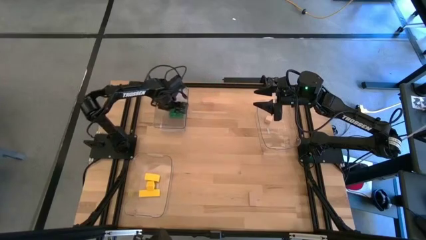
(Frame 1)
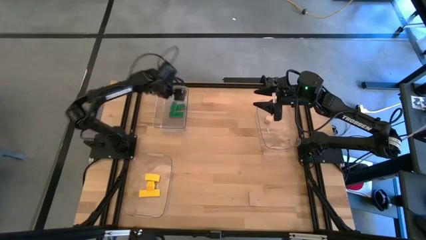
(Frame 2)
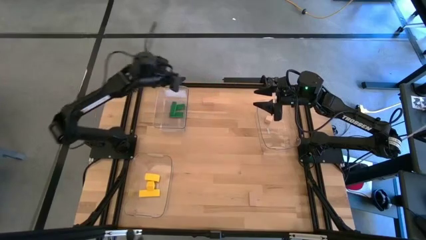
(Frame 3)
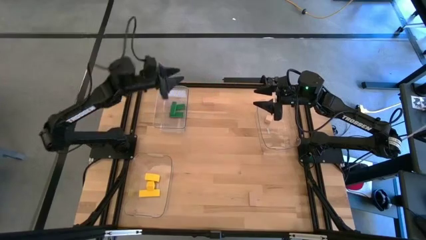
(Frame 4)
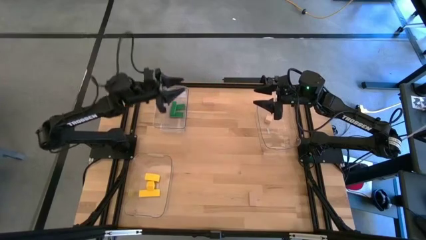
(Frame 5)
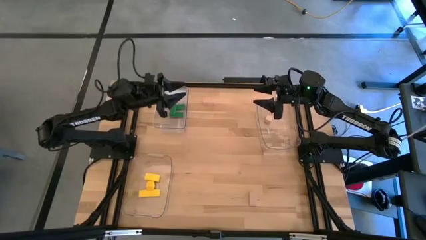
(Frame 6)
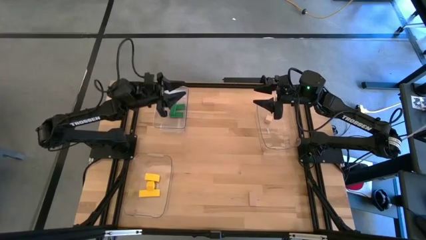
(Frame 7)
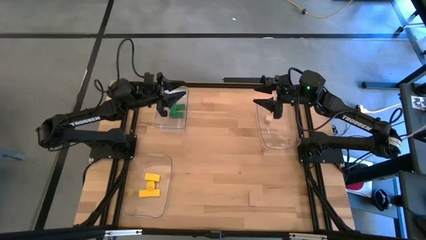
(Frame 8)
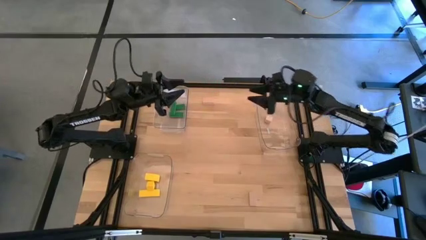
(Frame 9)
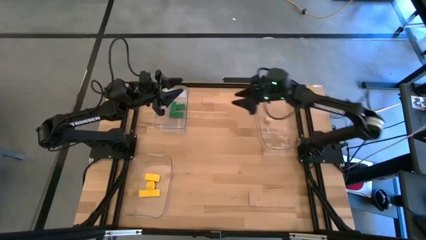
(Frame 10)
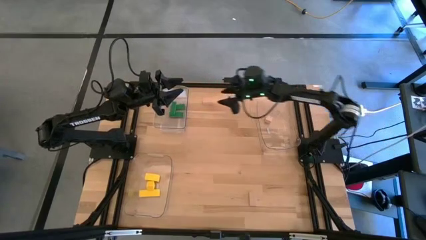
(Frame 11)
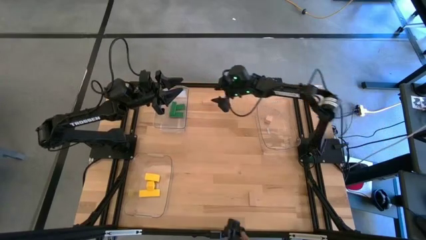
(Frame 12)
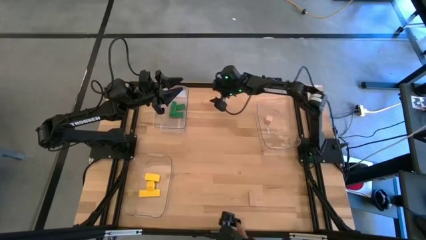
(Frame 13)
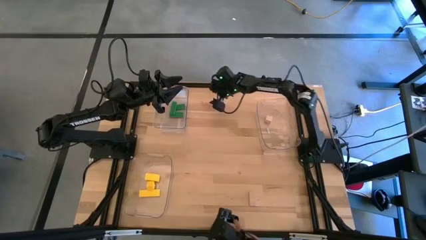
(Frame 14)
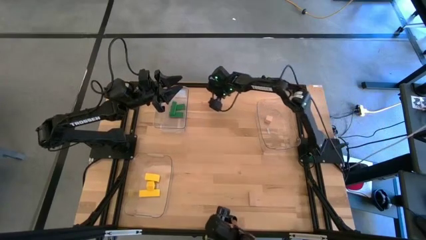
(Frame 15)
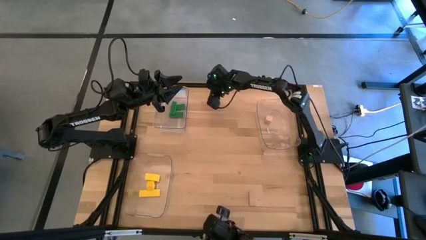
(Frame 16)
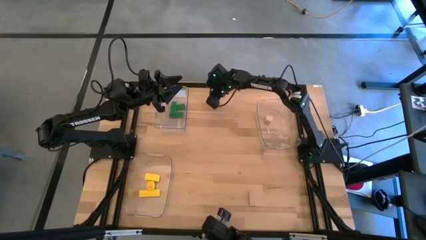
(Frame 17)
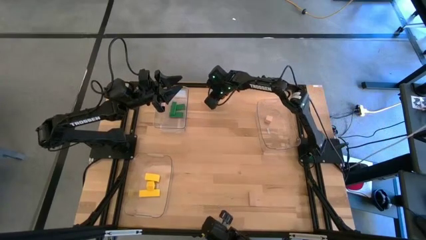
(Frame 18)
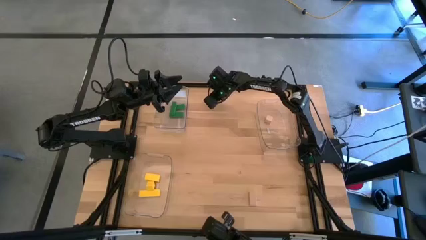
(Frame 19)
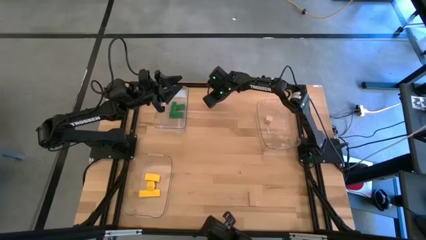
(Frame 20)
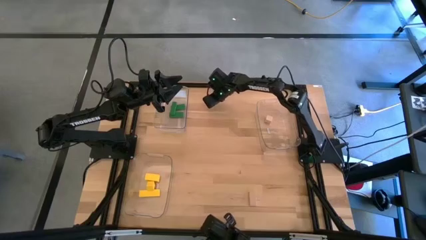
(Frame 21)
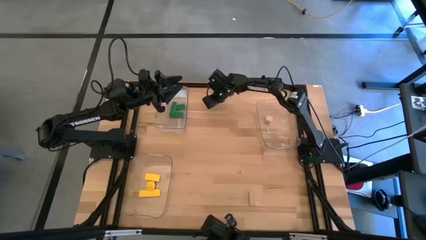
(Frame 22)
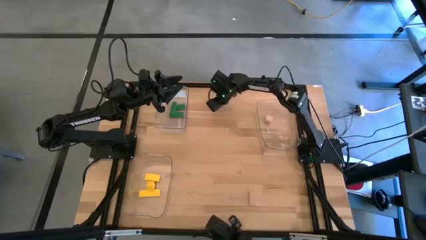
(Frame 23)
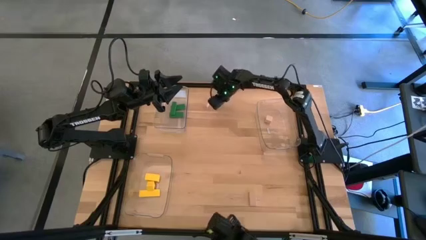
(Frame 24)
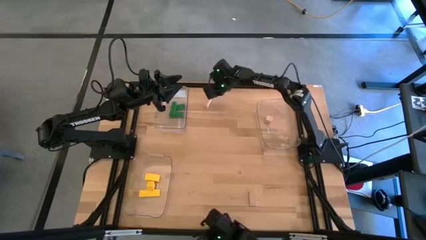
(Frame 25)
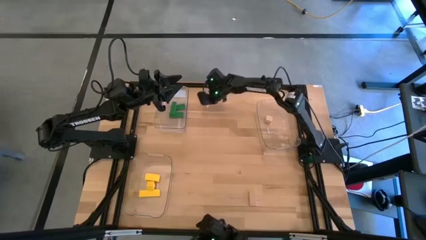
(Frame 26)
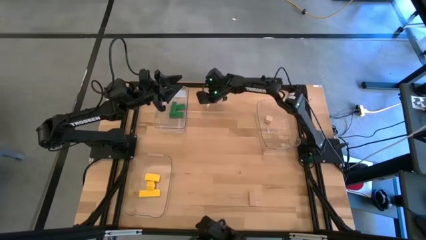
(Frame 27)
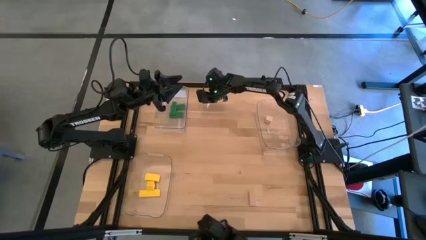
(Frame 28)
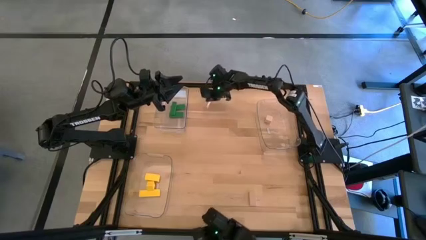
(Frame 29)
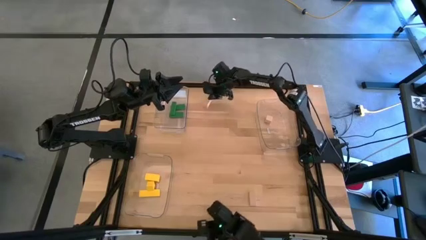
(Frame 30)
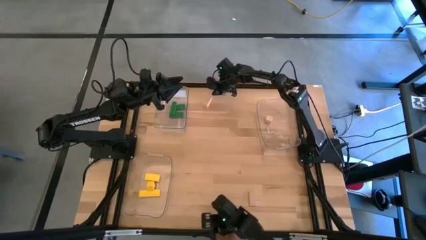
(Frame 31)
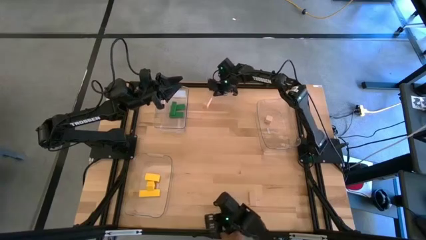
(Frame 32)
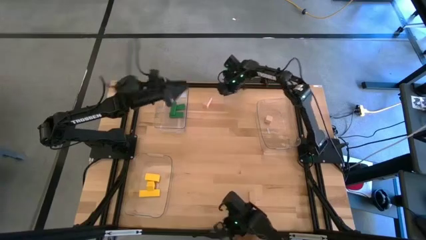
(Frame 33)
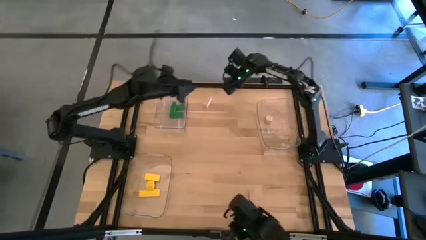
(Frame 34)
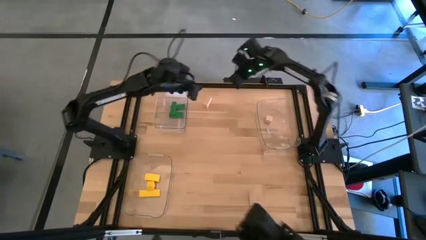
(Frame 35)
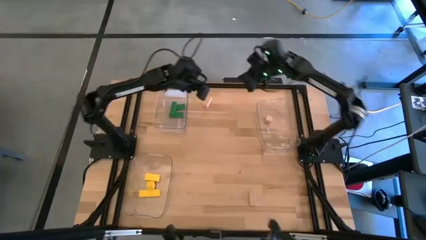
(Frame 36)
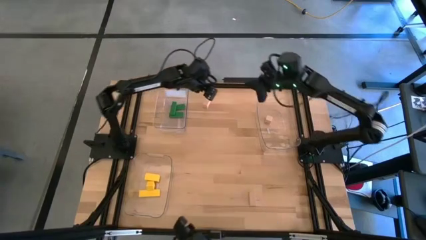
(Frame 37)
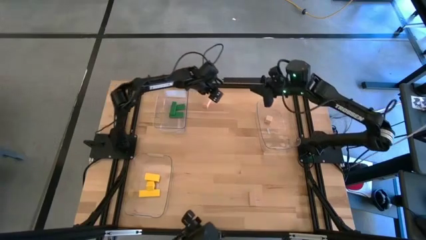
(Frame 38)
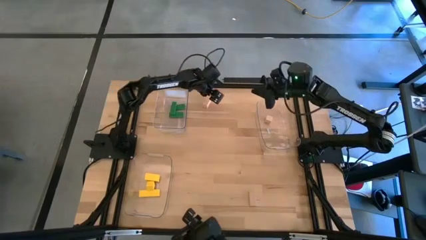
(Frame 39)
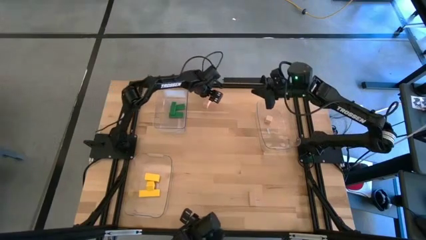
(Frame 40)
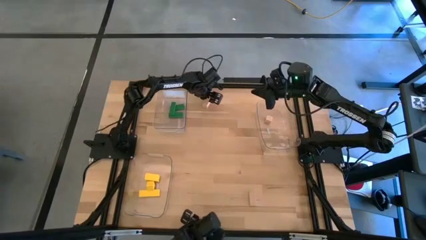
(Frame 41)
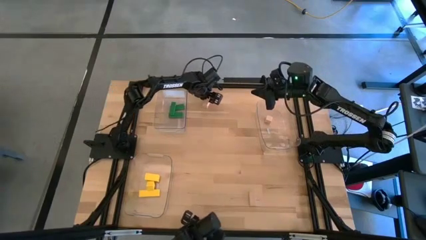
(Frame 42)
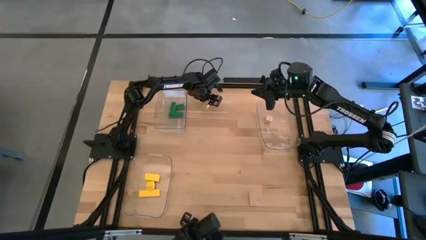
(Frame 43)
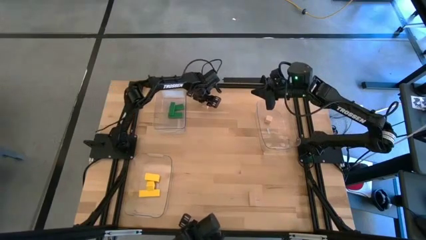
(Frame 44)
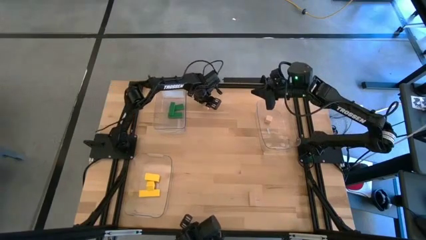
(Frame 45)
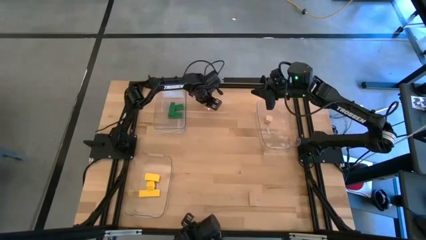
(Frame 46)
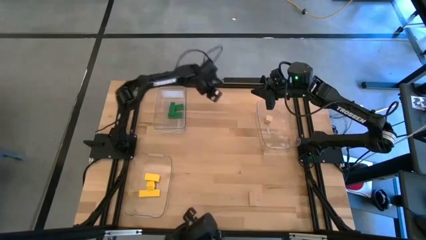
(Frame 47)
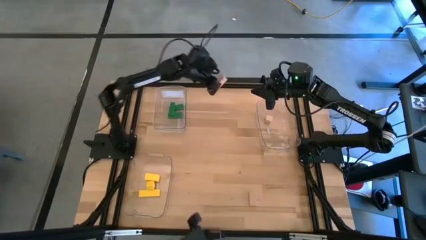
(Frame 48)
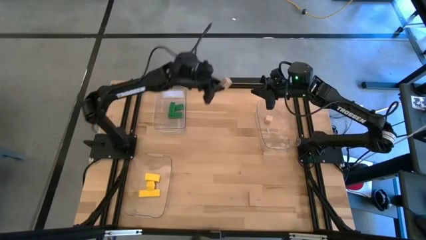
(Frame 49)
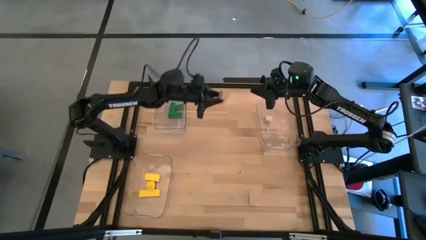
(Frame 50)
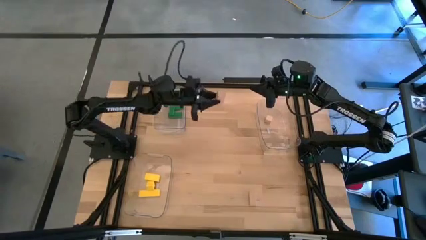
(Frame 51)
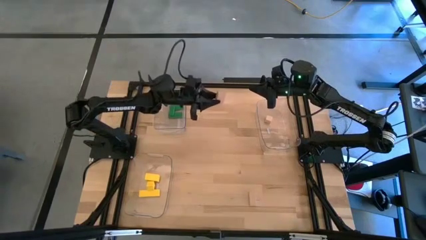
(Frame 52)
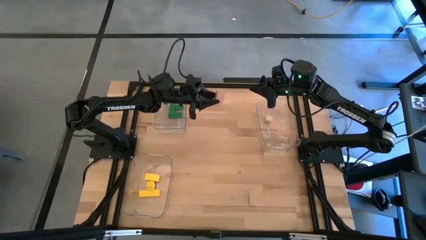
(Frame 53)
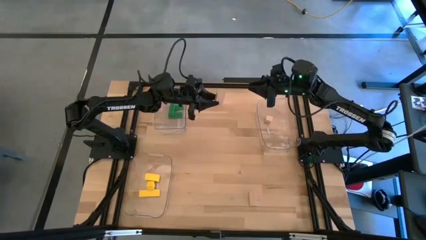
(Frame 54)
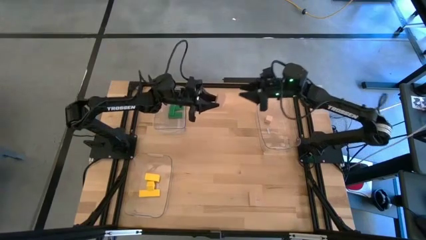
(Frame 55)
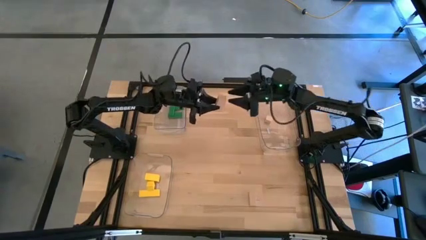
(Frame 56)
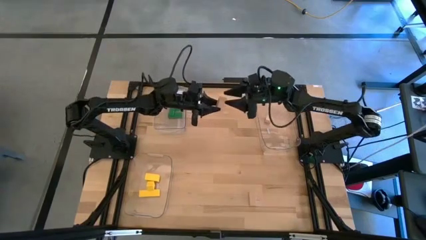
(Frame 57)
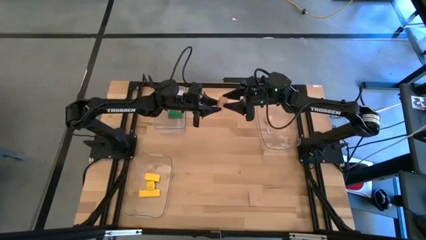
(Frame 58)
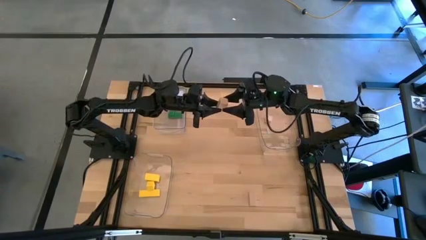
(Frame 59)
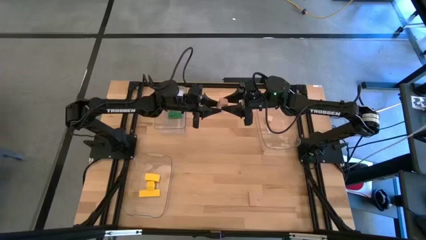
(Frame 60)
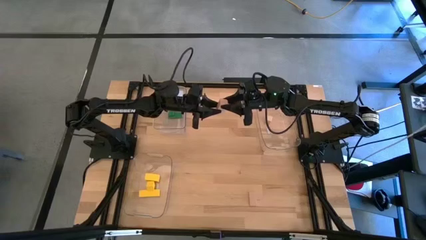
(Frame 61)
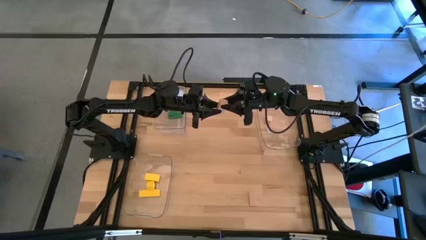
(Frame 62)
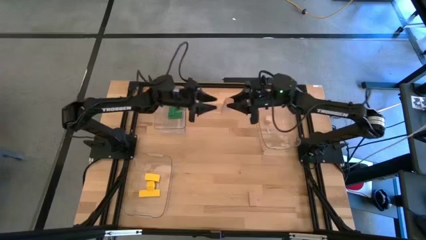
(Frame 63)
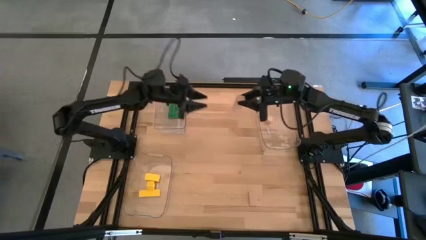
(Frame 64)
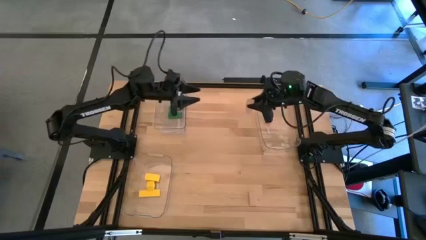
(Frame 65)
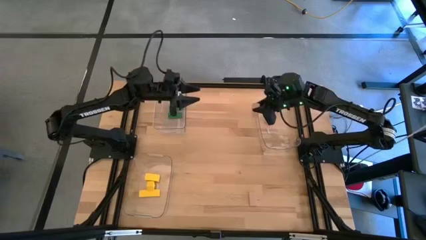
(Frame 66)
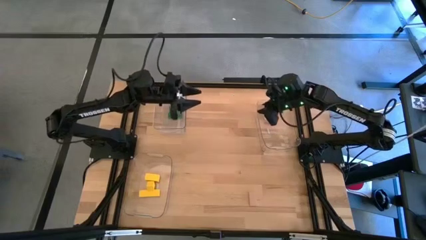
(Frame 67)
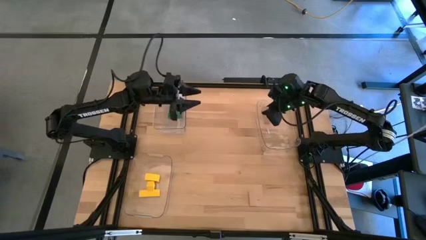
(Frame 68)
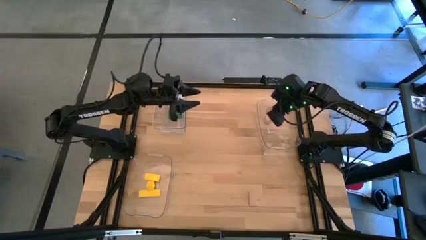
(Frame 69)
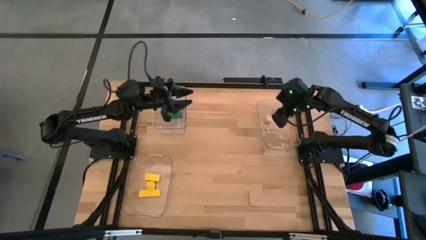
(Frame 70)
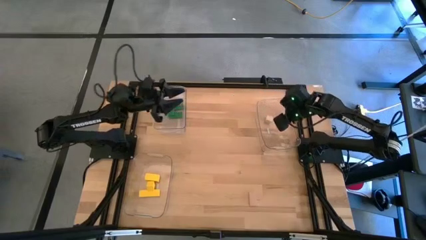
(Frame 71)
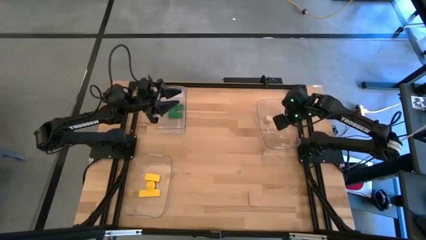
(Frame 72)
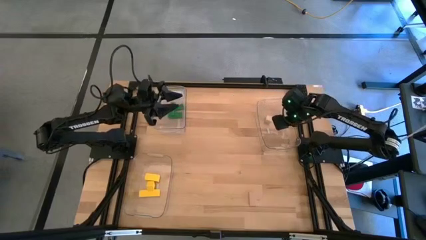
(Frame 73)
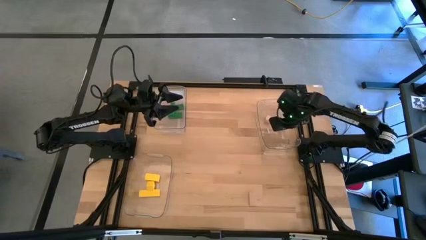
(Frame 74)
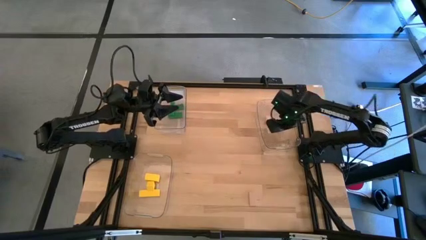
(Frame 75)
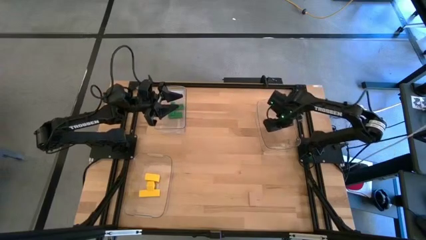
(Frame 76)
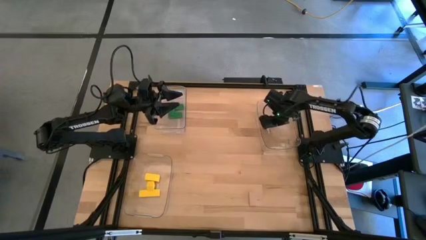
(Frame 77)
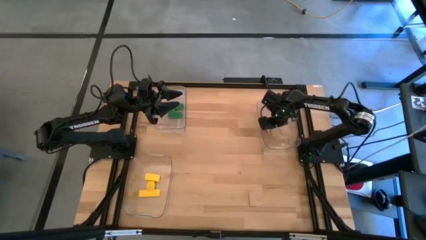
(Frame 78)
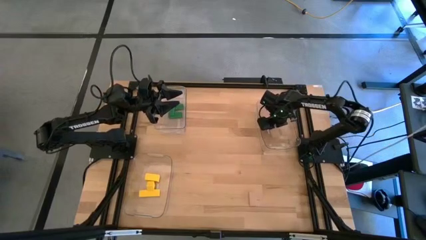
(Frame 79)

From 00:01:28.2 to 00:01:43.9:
Task: Sort & place blocks by color
Put the top brown block into the top right transparent bin
